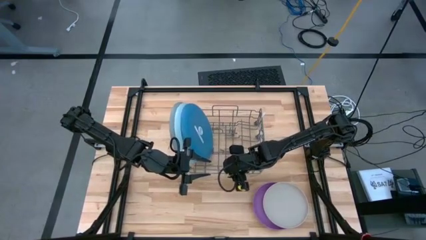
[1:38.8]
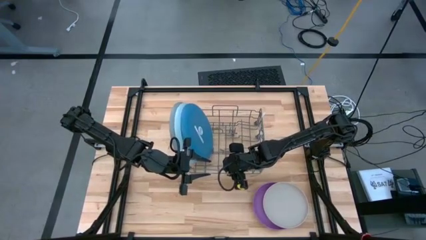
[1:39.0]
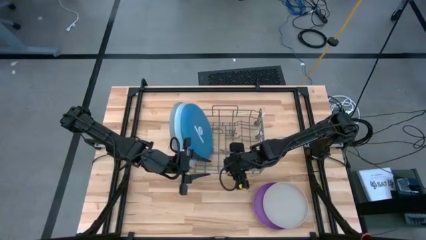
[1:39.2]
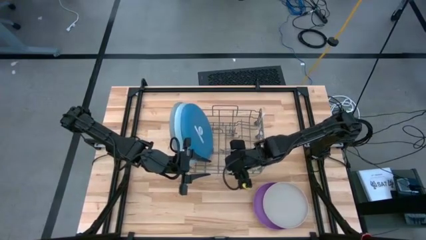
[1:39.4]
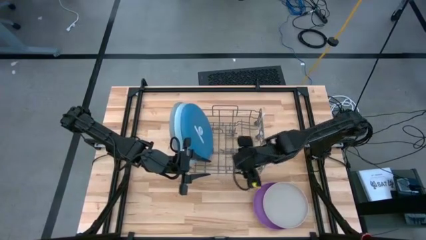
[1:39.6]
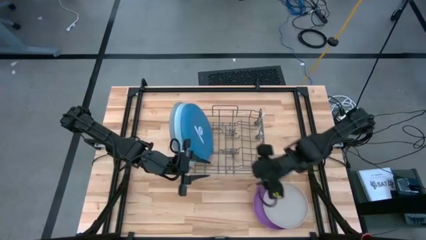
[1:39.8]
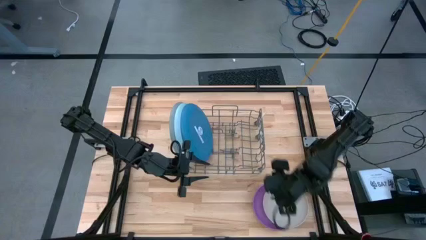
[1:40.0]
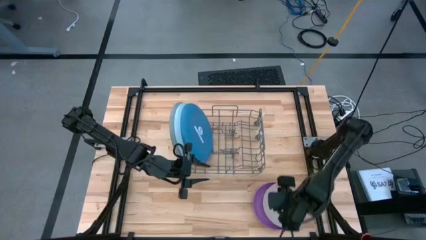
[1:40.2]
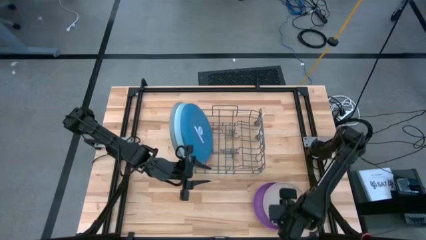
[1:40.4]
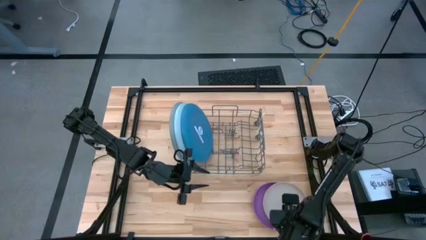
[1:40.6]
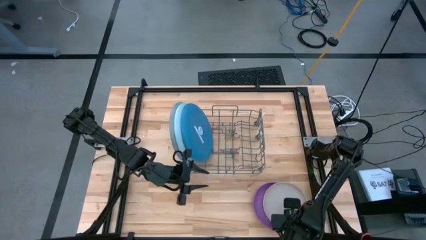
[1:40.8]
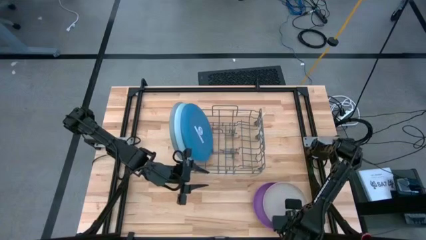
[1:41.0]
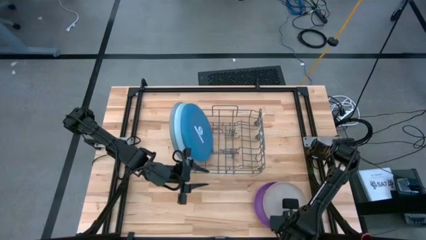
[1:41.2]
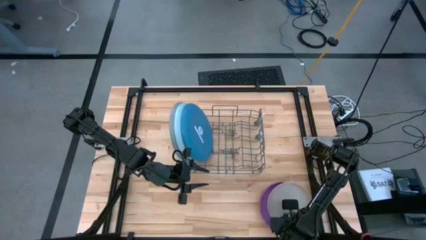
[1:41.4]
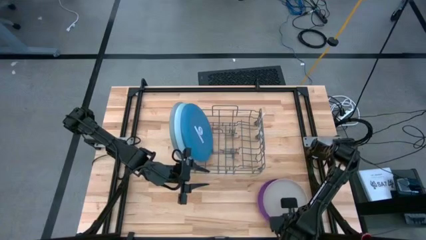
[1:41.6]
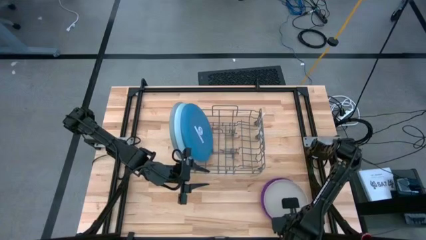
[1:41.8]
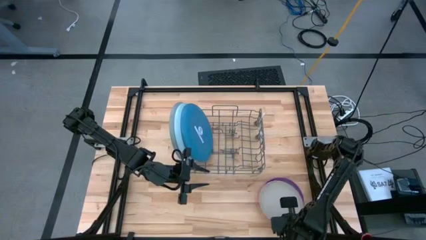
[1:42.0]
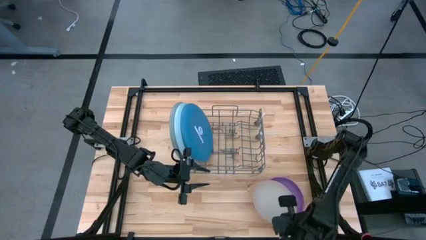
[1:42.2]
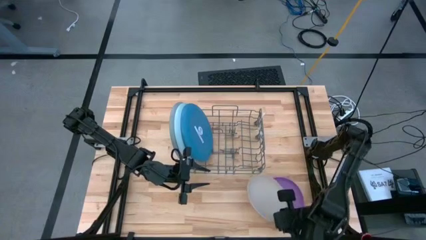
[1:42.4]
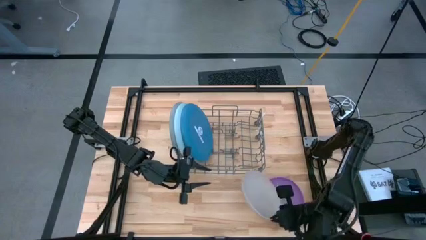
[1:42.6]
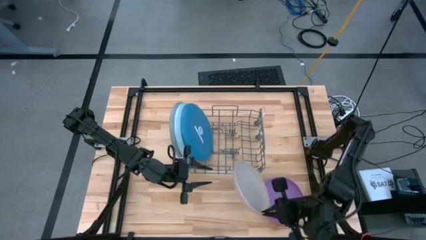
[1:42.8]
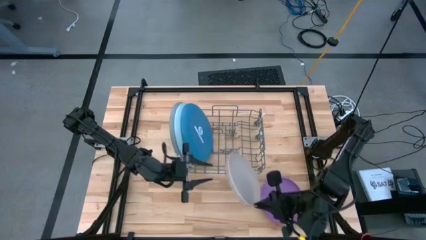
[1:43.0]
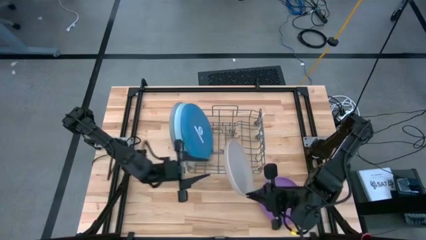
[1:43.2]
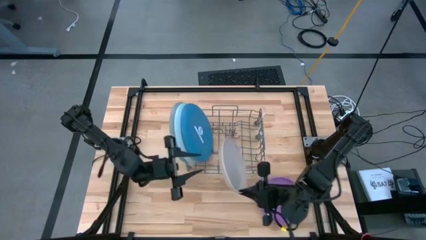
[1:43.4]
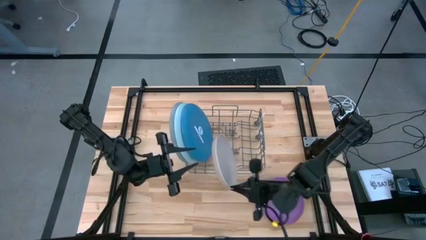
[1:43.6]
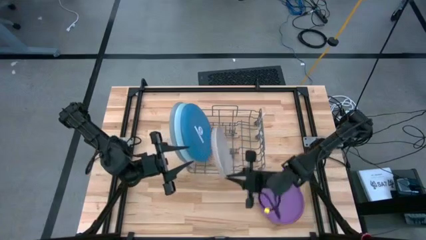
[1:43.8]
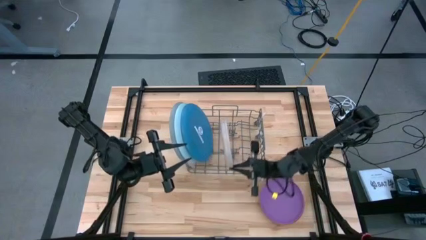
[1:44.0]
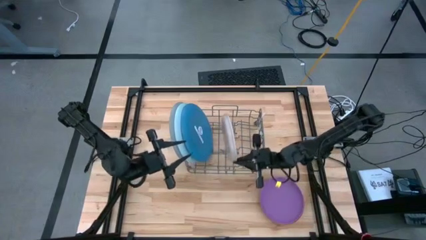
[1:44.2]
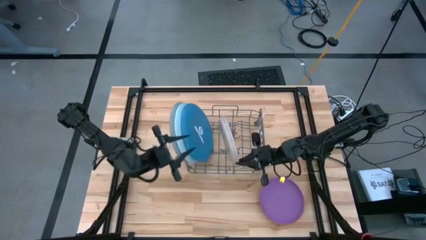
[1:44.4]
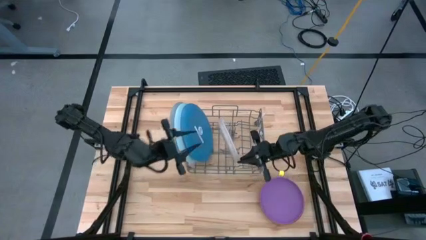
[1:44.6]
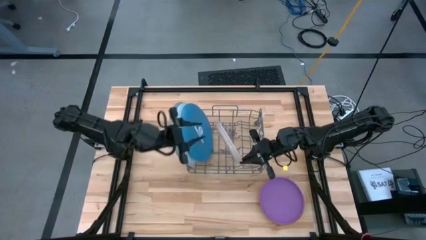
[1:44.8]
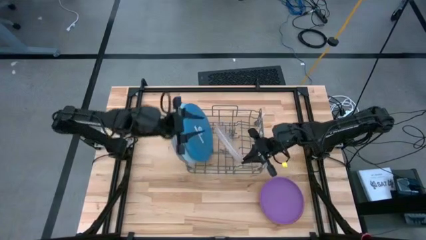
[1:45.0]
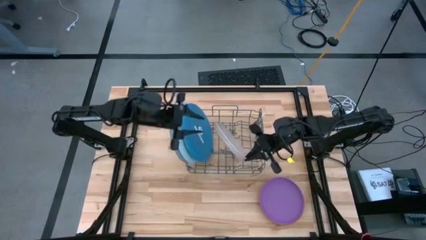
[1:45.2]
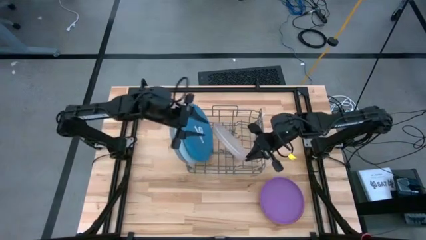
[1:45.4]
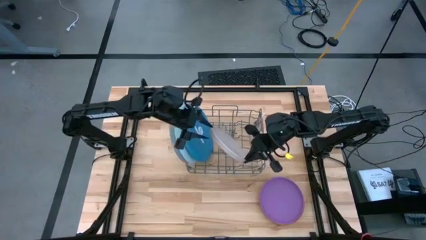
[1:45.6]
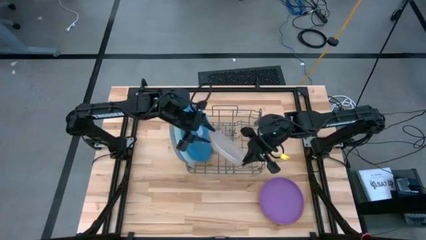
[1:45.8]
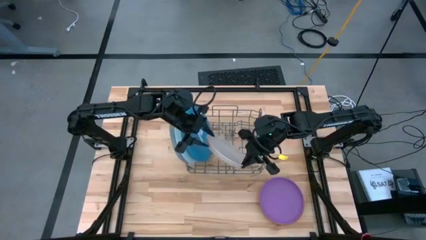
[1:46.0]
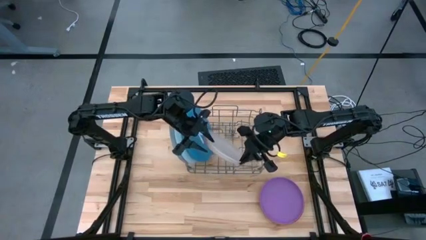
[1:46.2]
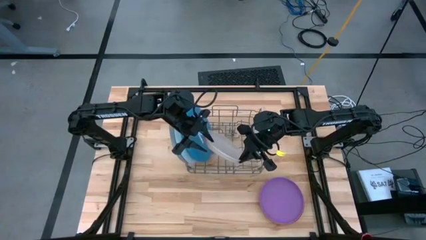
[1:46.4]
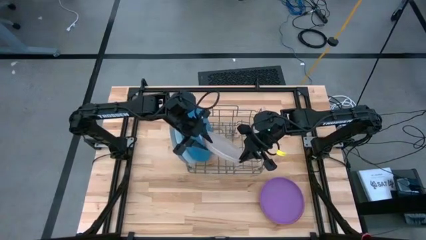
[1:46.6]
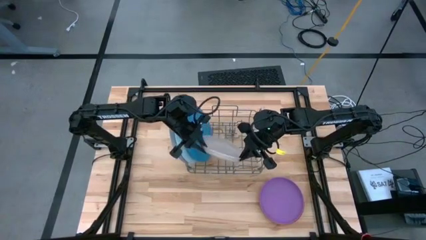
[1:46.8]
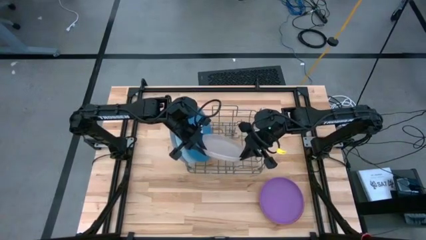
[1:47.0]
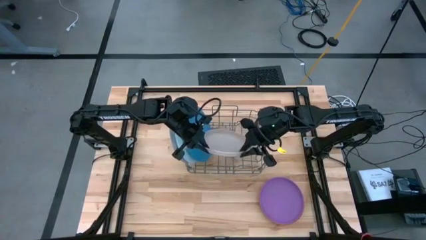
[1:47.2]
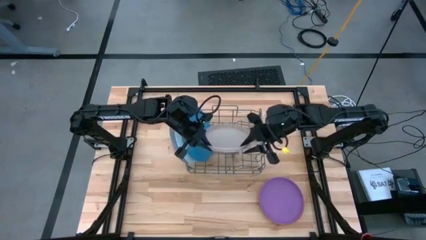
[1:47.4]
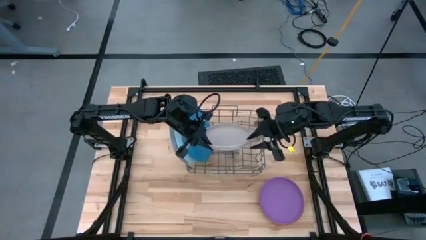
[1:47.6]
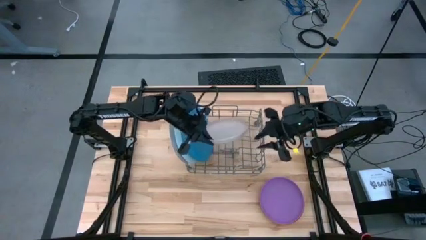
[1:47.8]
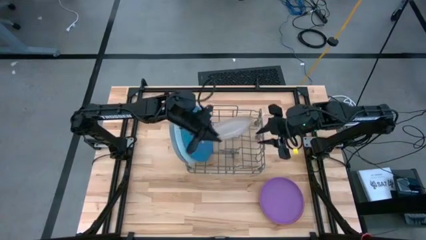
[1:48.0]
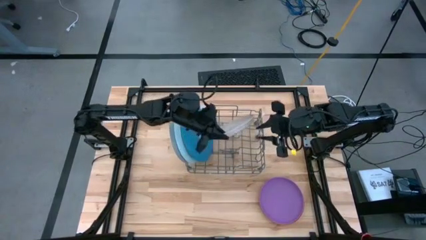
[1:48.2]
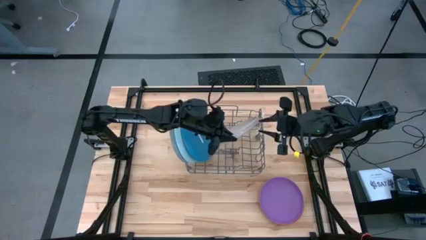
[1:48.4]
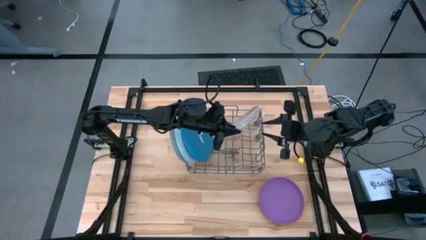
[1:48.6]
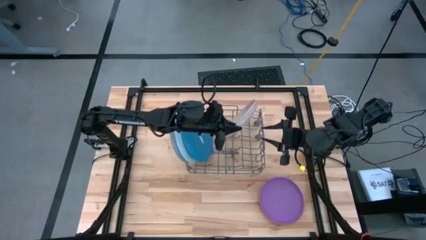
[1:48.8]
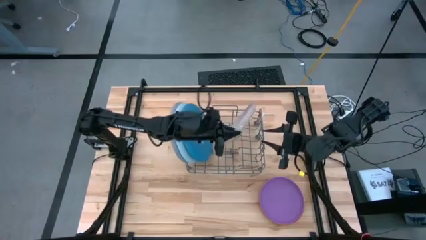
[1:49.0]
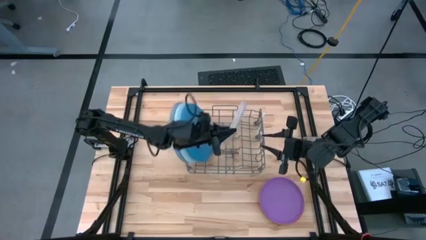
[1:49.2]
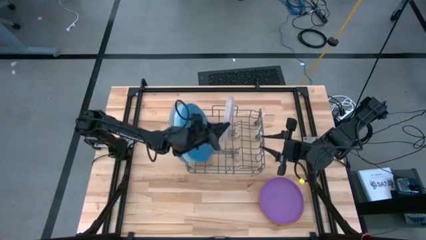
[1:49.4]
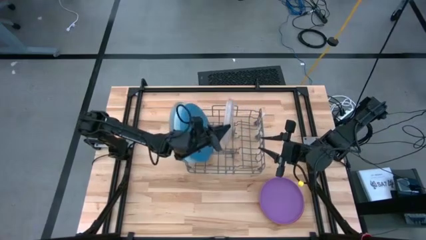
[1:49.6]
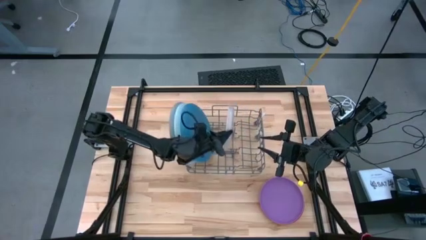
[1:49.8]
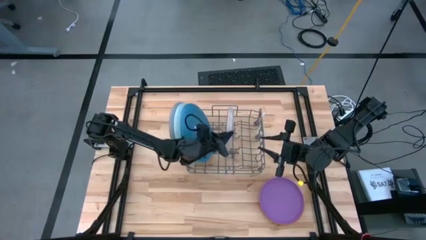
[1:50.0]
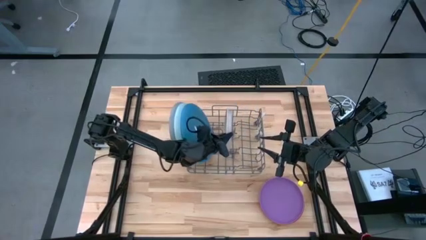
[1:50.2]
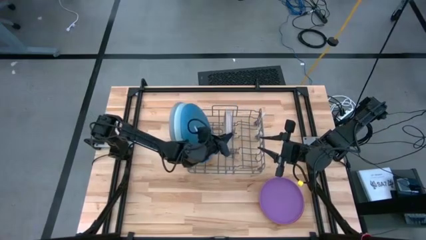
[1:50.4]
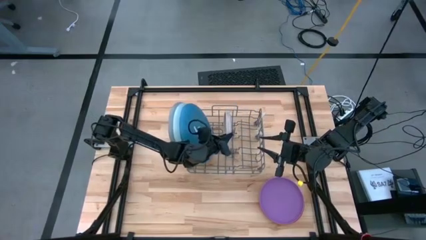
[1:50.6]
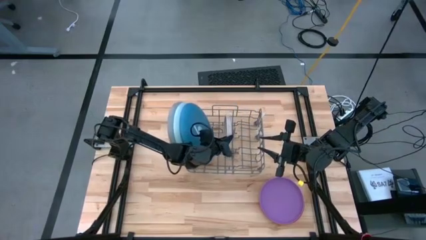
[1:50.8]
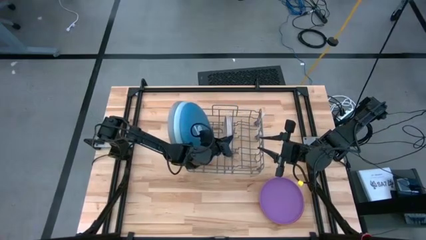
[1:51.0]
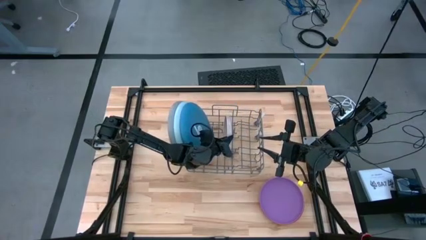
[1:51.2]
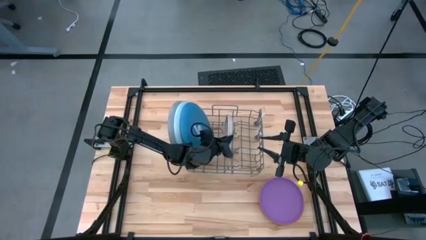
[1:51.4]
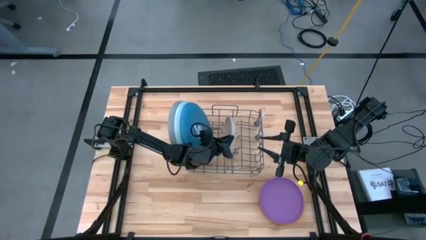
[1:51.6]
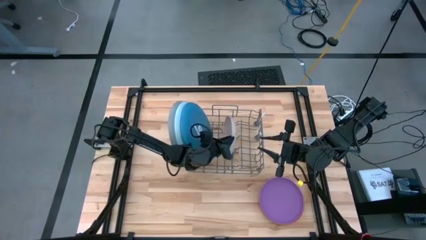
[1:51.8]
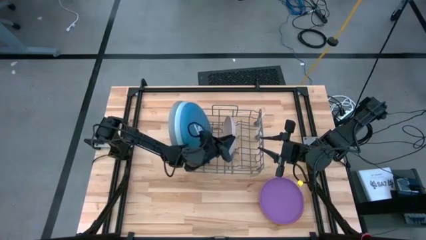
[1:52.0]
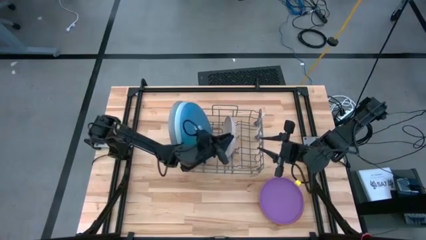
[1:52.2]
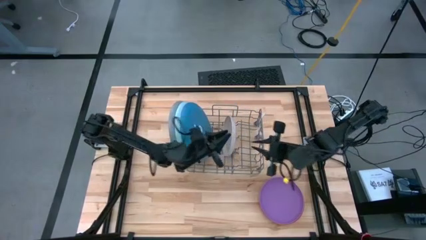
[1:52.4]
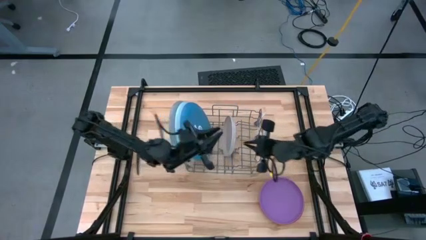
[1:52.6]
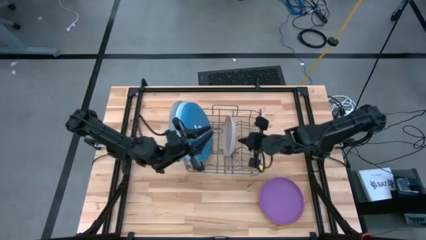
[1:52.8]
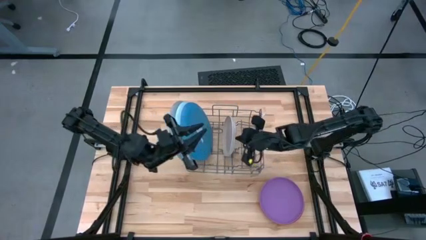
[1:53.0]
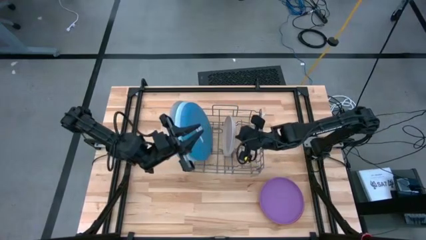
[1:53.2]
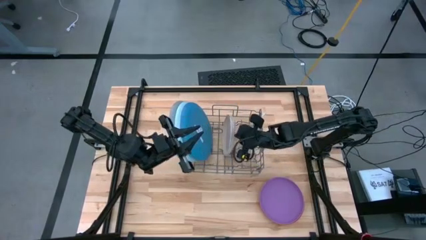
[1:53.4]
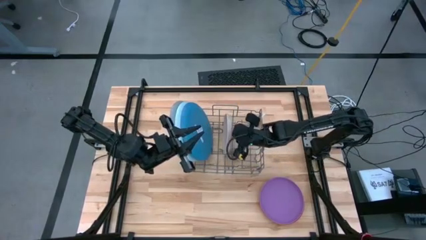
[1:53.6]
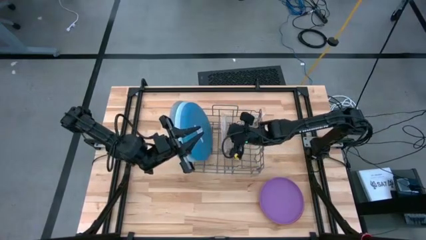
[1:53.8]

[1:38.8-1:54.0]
Task: Sort dishes
Put the light gray plate into the dish rack
